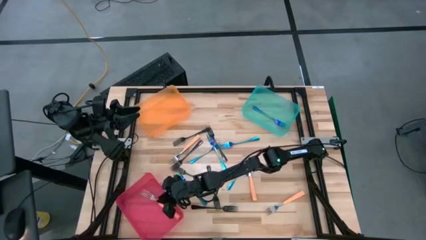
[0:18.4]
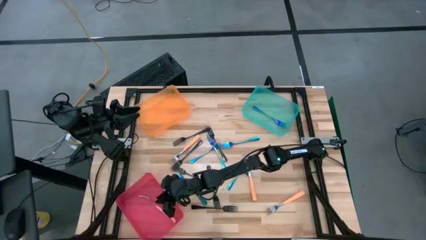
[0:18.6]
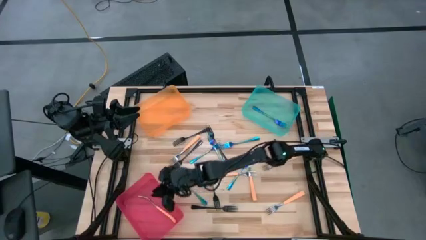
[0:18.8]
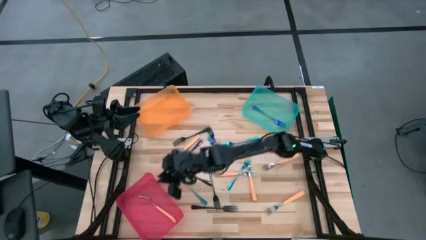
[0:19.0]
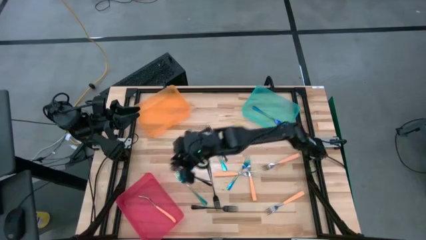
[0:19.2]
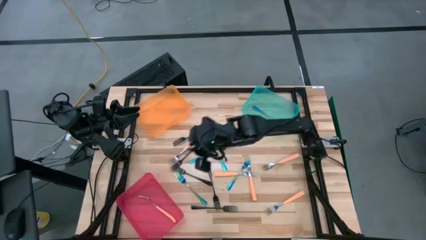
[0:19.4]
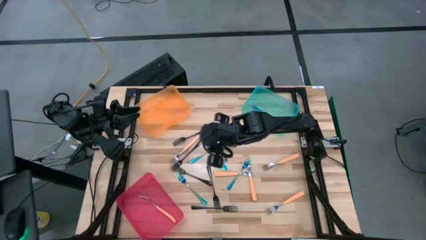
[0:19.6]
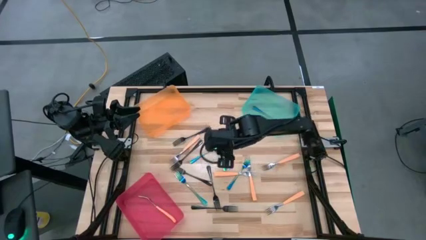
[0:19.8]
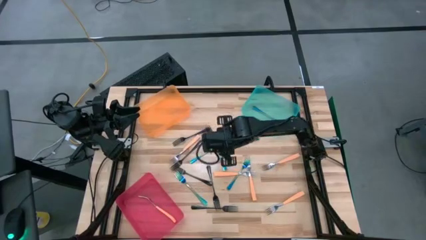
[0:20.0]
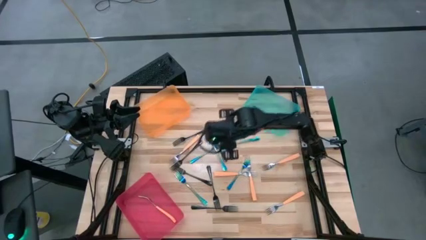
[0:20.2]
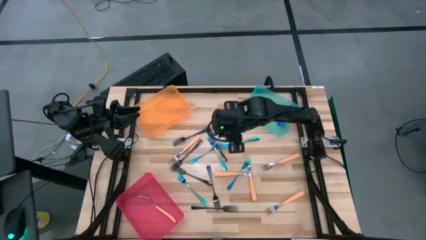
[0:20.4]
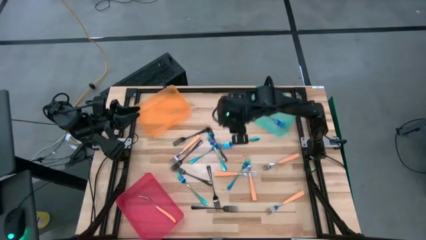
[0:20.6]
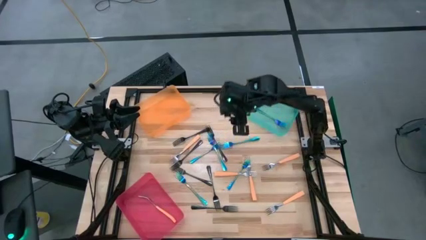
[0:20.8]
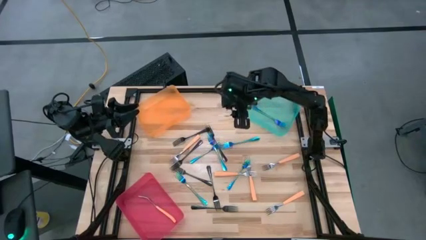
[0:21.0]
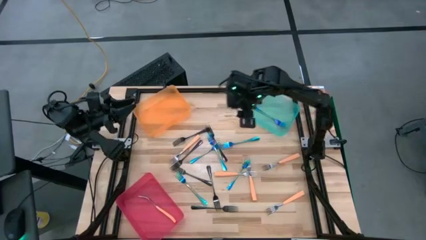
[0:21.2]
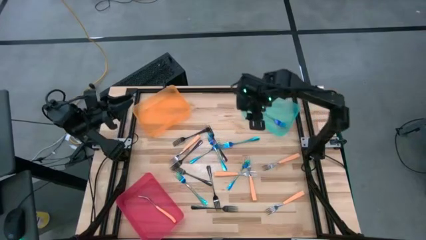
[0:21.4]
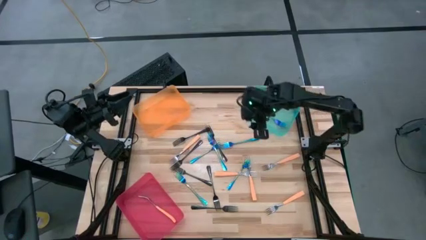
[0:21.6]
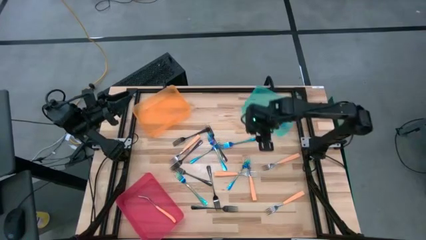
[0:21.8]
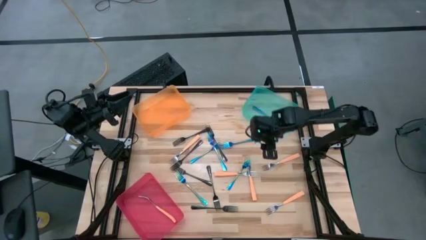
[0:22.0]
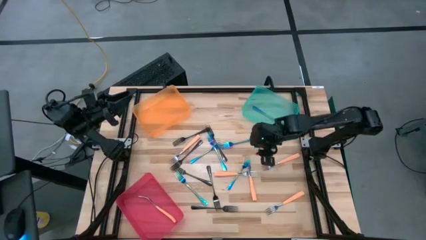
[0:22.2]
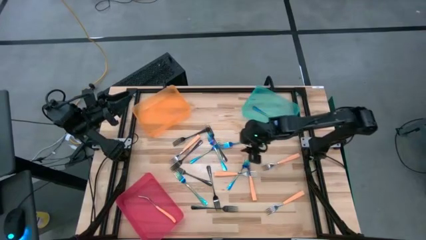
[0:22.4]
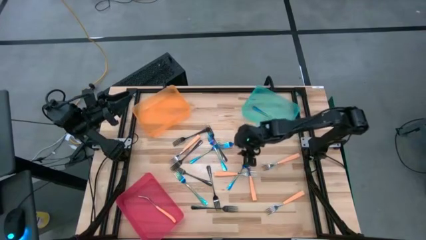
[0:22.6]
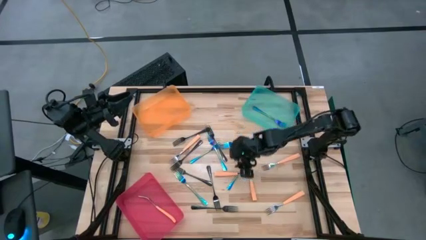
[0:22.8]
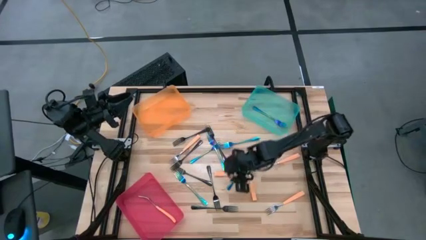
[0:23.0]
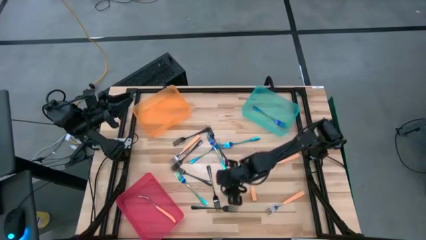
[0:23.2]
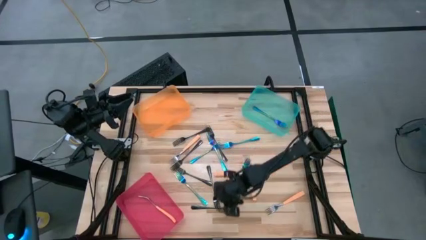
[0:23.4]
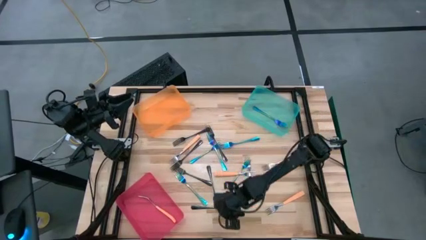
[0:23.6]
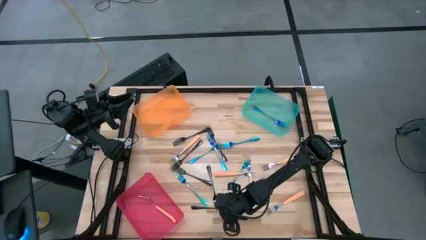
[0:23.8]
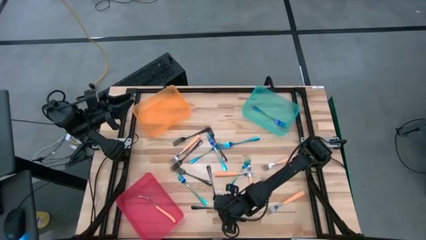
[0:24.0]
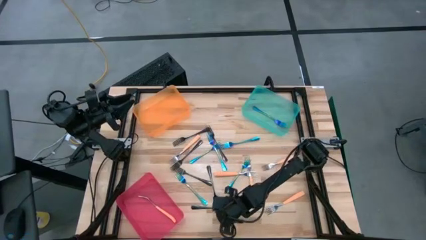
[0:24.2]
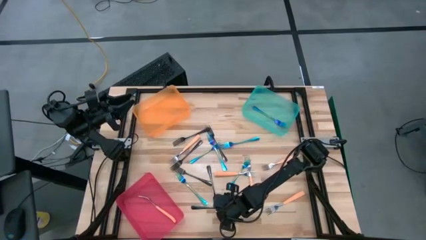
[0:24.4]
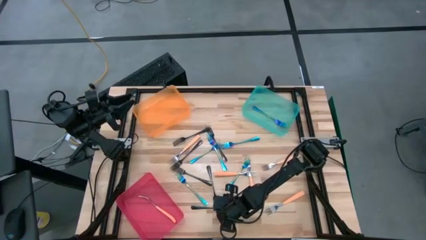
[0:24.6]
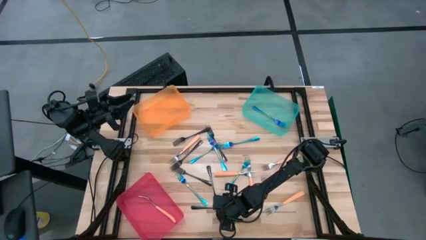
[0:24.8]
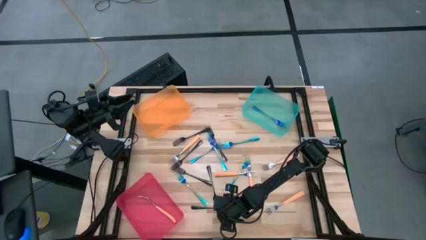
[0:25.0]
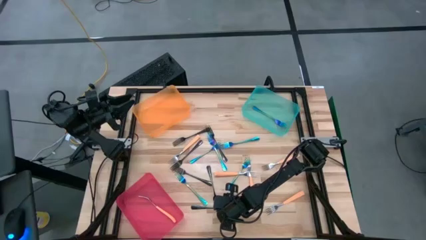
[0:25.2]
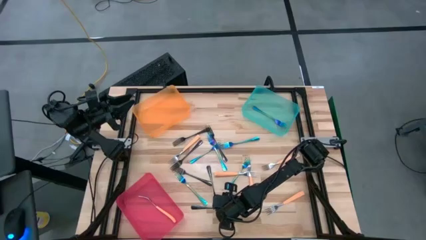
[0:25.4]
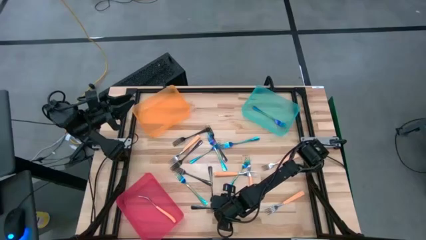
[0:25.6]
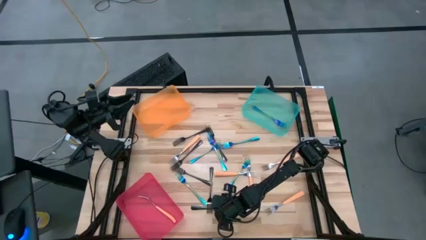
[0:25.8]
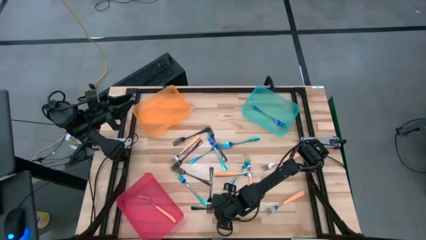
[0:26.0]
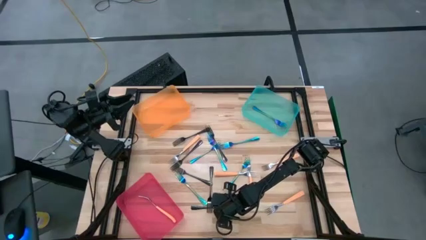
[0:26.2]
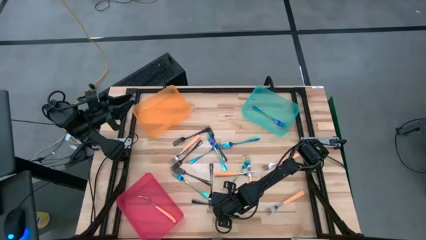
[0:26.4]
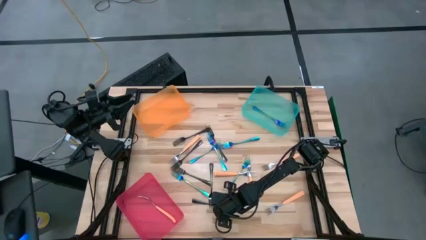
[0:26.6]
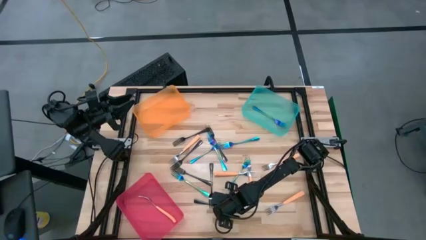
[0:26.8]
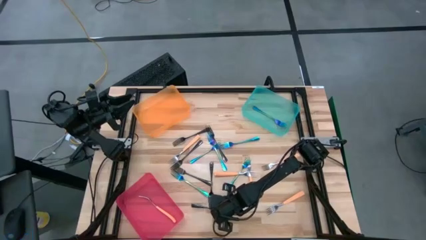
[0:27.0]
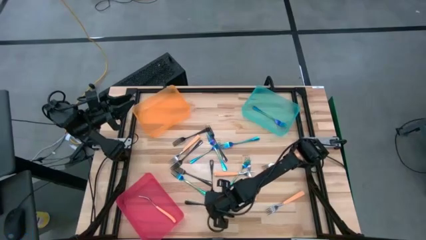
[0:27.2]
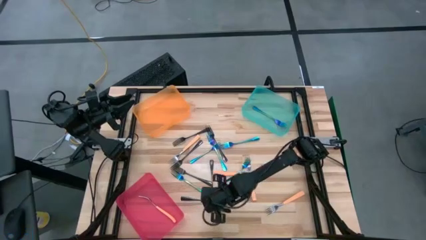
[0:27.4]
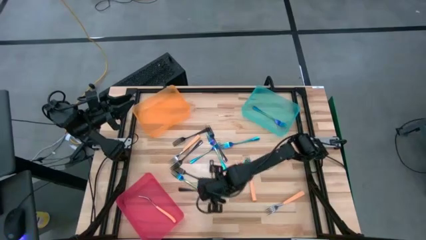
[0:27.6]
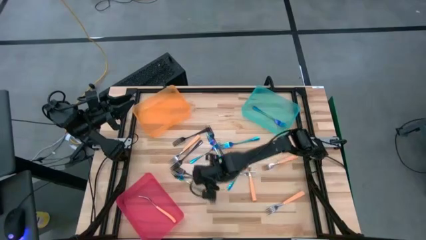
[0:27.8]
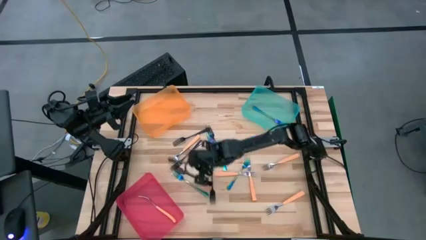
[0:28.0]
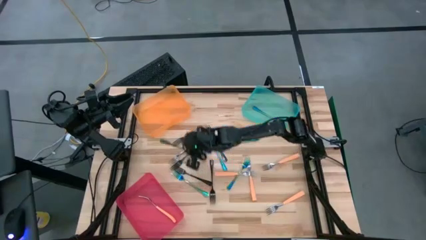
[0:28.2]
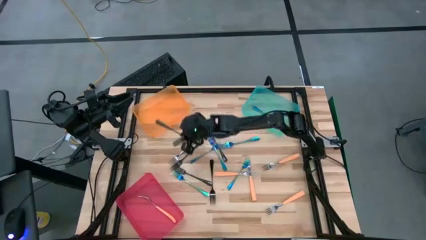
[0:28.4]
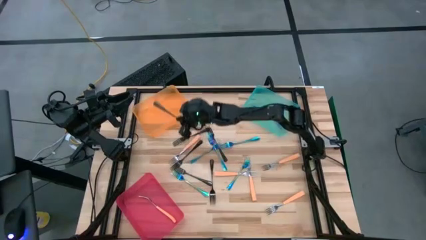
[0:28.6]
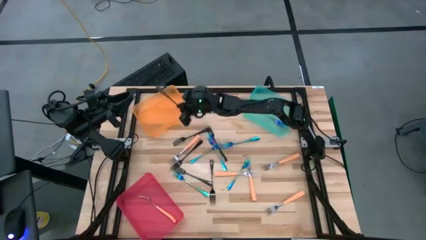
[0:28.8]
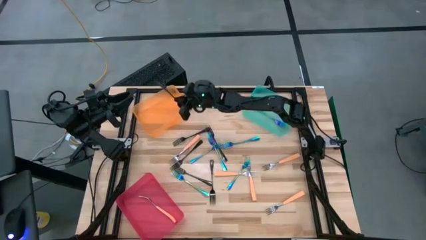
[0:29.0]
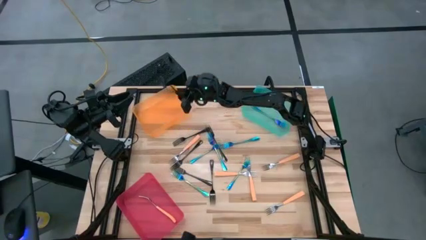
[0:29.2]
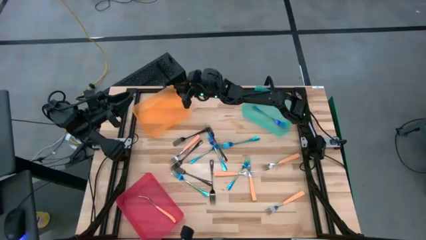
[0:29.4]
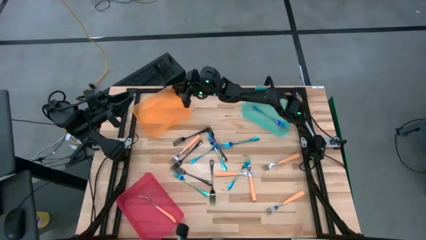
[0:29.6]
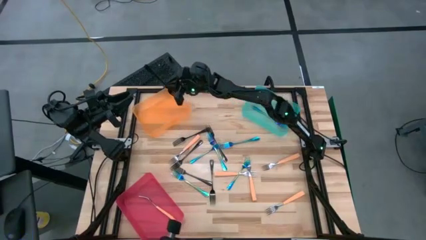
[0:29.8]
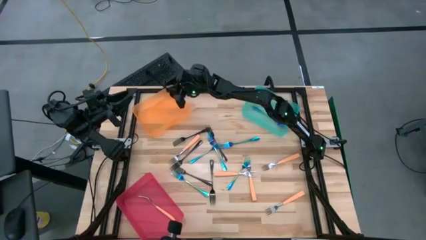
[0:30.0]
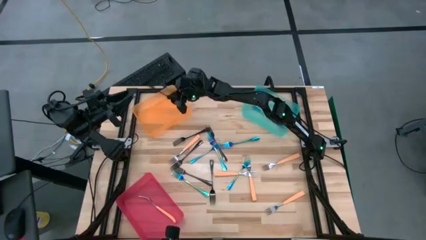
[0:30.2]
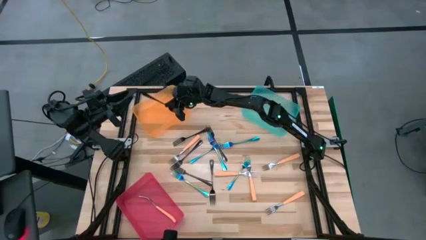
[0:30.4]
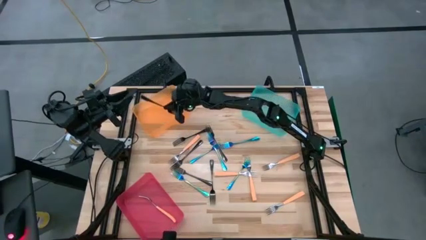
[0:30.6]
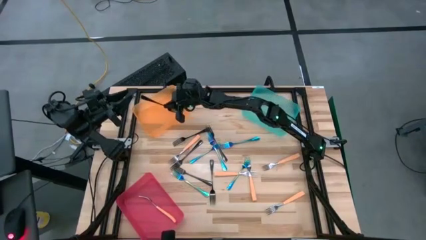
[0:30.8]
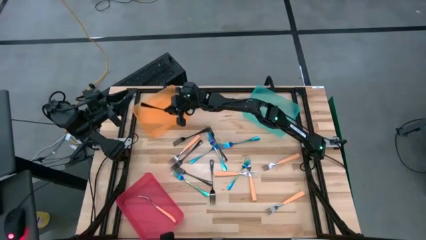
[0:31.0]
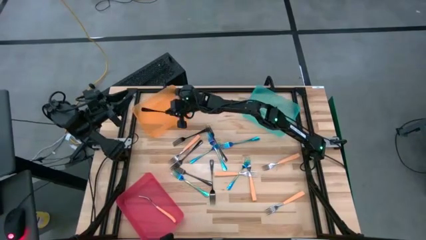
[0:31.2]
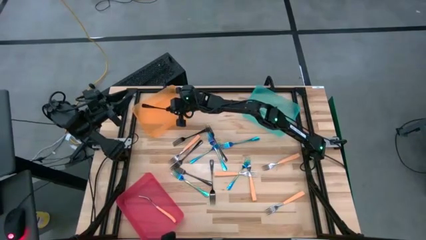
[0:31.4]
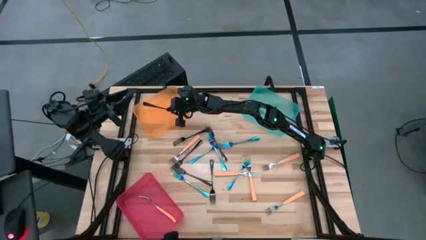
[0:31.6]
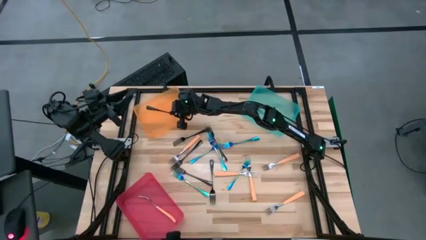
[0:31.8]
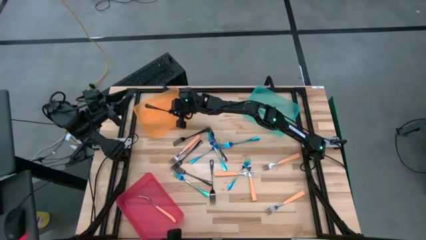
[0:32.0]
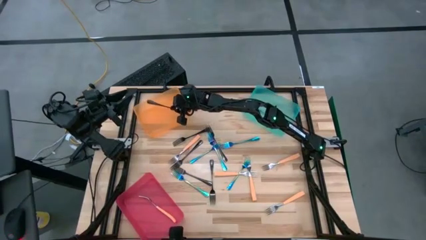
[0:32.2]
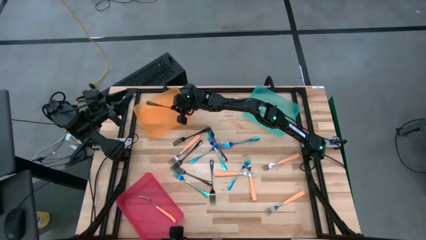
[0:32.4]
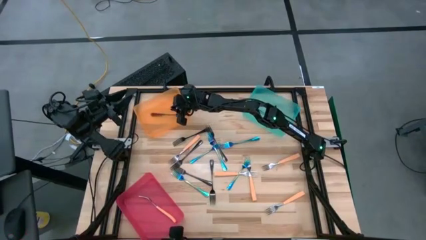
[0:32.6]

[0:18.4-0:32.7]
Task: Sort silverware by color (type)
Put the black fork into the orange bin
